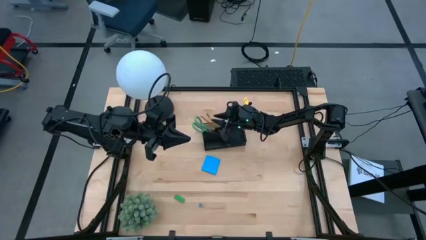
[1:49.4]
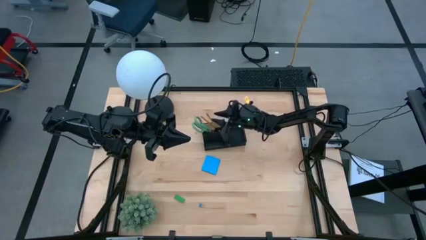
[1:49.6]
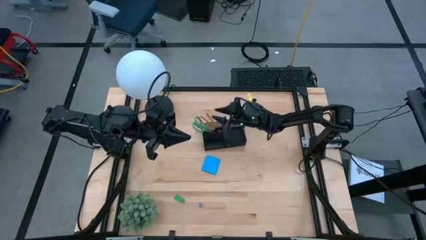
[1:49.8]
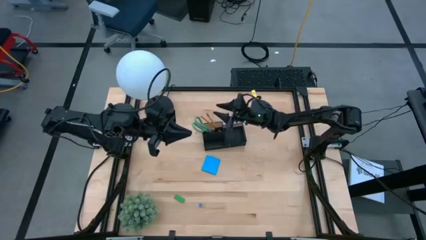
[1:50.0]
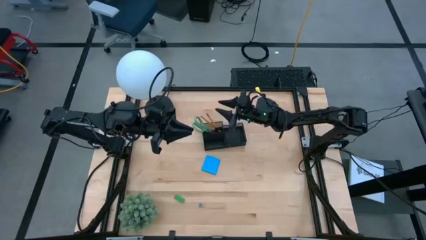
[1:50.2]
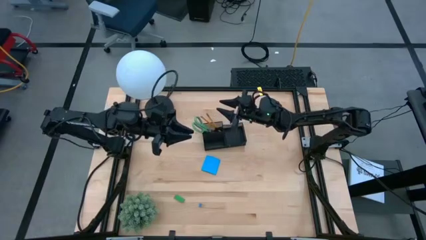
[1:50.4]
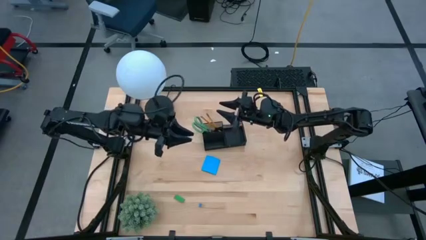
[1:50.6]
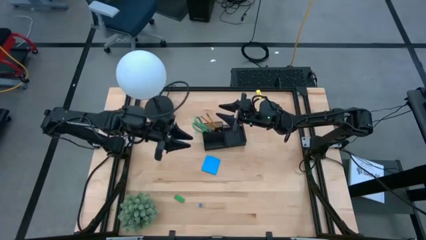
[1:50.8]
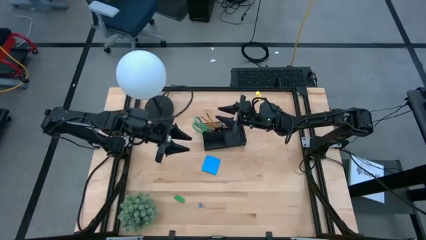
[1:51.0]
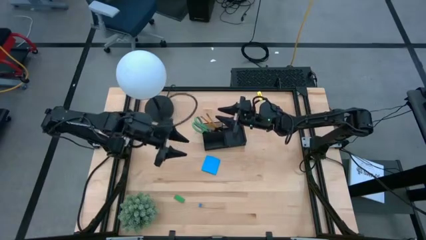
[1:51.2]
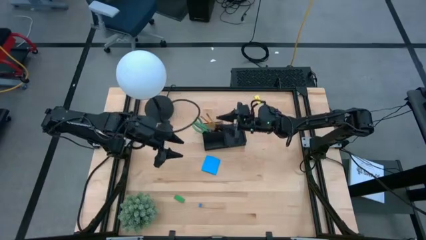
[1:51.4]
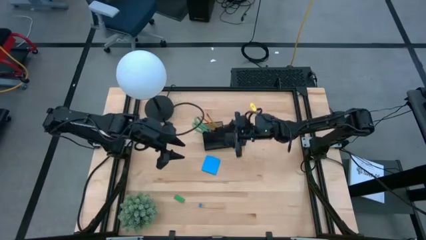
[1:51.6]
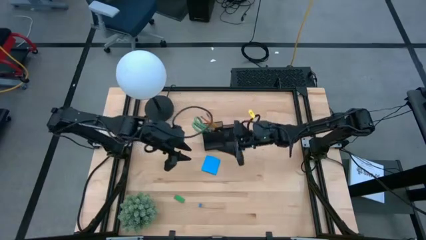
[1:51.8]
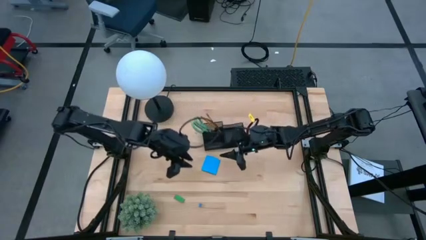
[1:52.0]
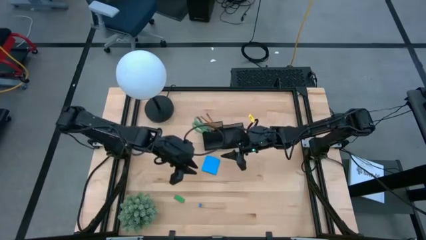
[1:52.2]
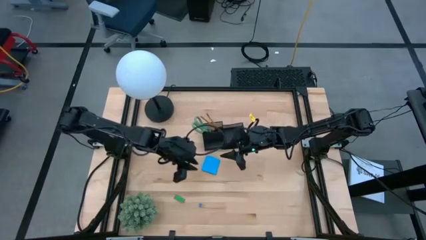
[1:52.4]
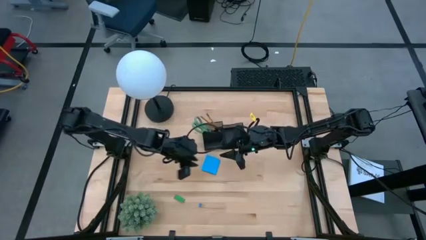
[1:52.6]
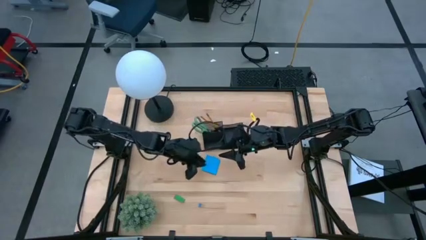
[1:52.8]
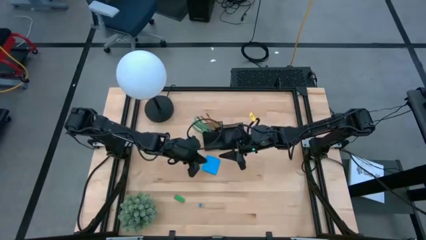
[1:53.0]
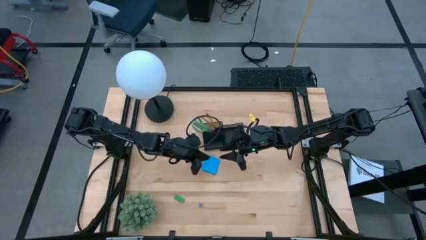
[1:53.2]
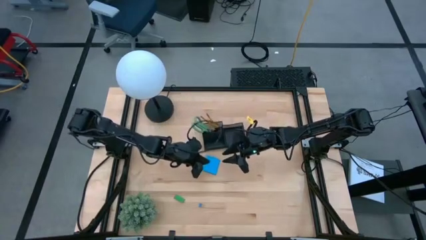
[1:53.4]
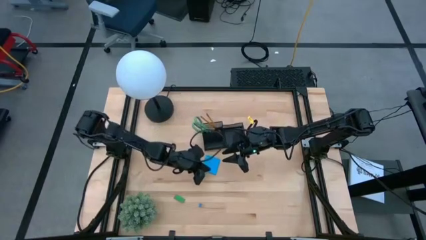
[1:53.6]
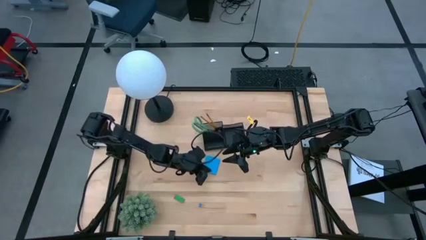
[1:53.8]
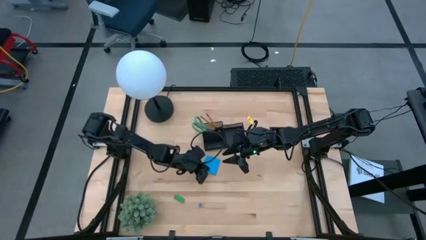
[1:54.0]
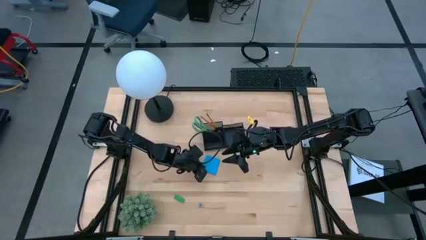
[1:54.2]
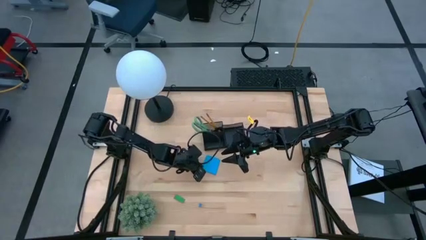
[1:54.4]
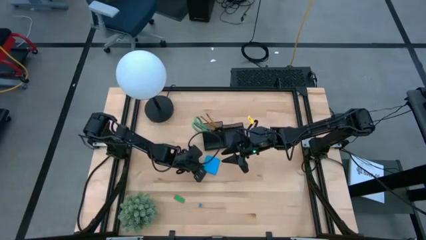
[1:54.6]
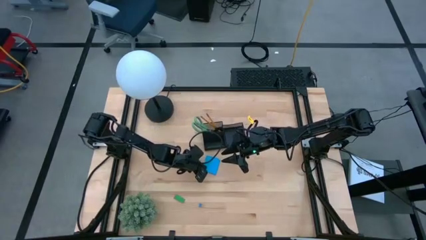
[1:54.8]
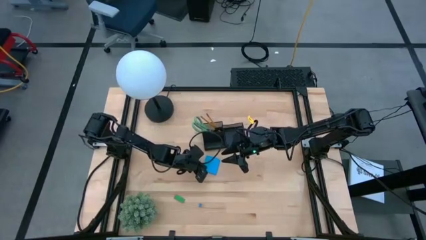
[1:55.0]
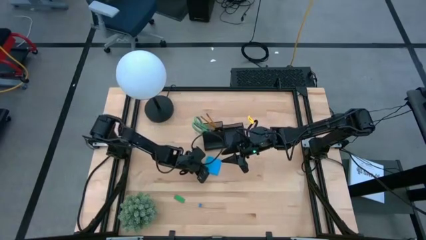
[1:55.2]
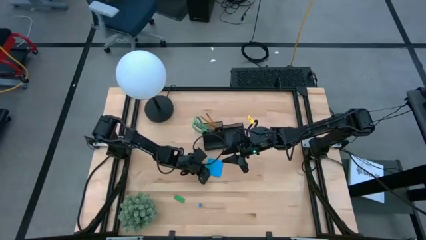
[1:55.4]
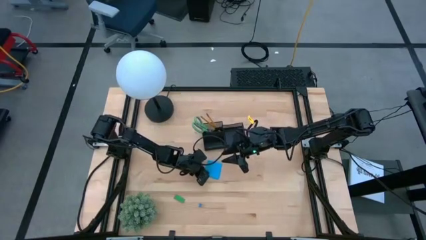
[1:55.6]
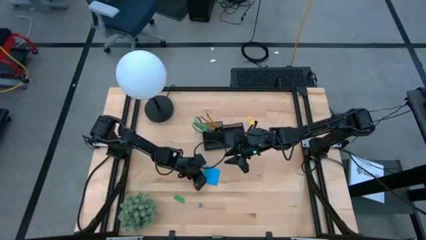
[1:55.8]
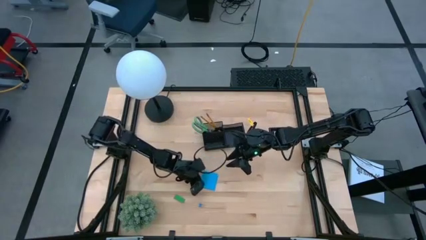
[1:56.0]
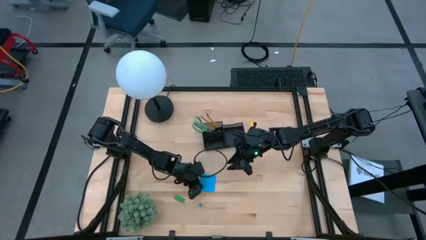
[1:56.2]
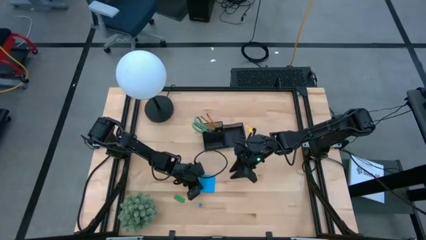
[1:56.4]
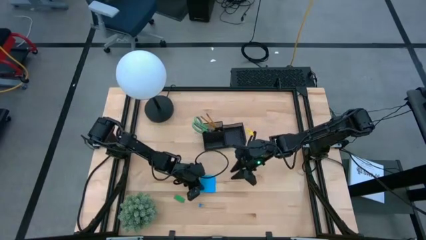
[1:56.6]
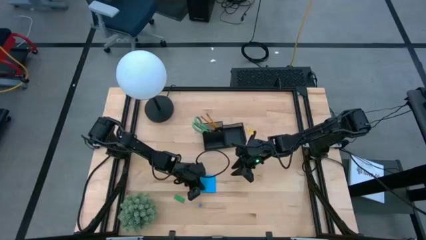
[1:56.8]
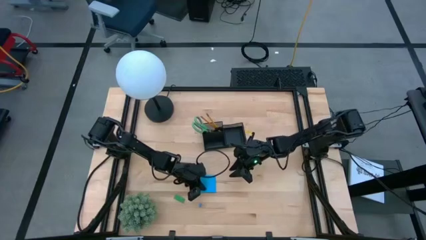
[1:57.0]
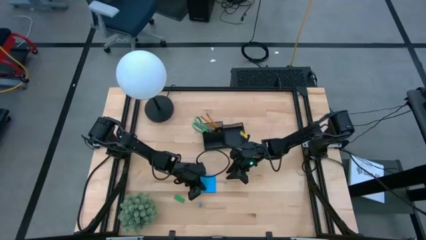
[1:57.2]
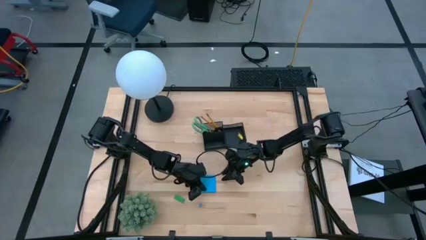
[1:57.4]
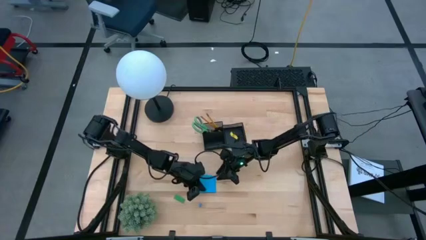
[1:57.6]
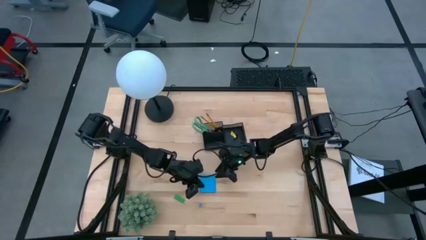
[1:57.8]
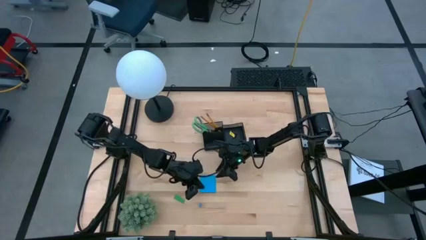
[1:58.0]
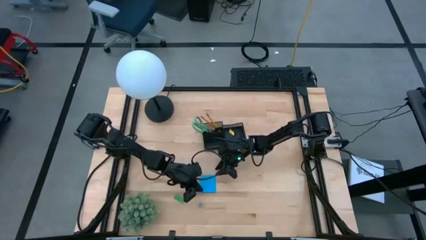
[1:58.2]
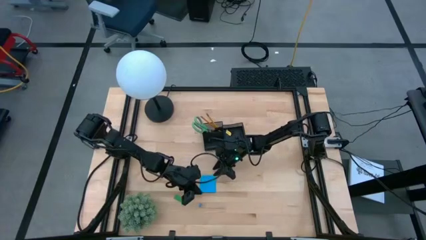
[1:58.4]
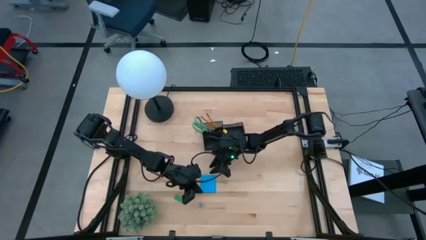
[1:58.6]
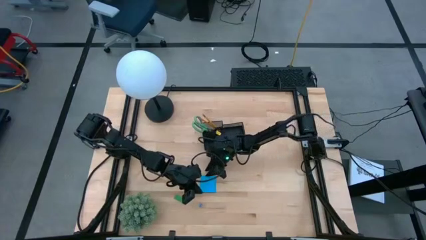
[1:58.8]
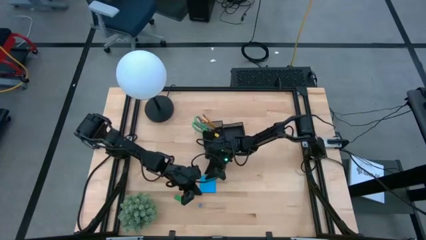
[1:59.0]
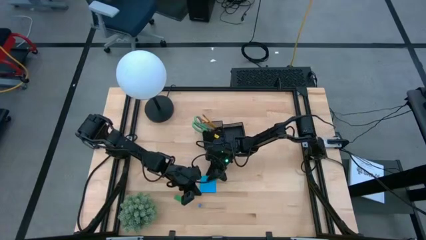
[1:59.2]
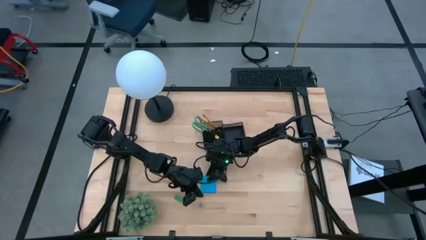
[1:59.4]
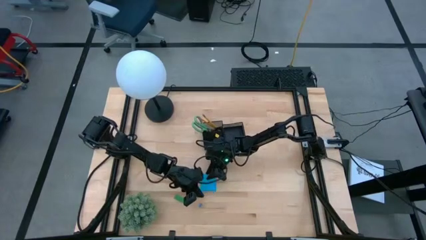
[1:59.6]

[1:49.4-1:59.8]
Task: Pick and place office supplies into organizer
Put the blue sticky notes into the black desk organizer

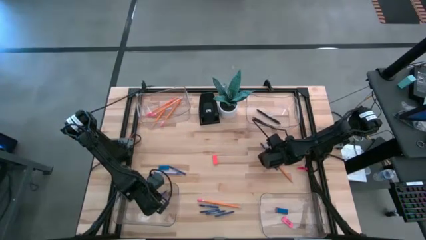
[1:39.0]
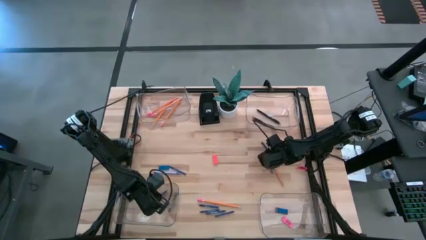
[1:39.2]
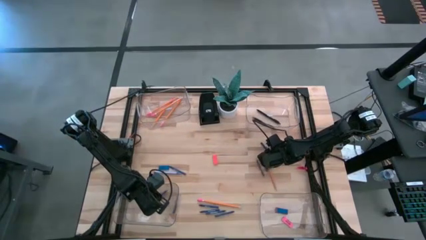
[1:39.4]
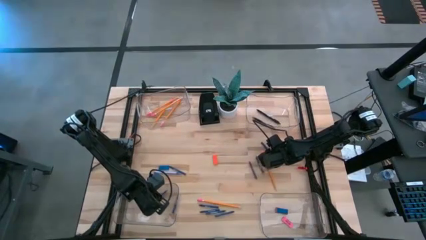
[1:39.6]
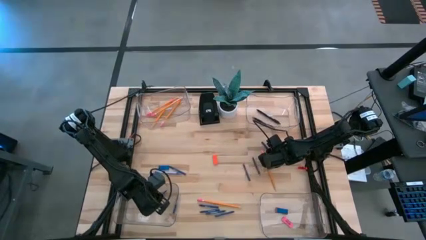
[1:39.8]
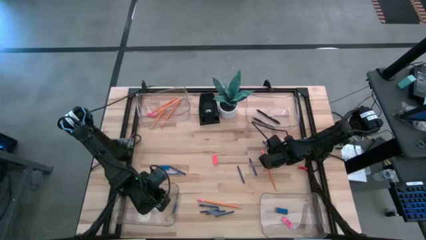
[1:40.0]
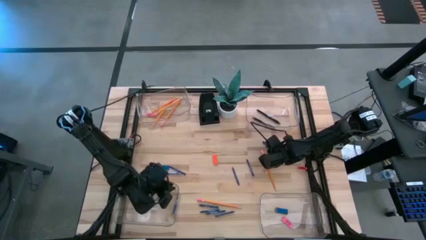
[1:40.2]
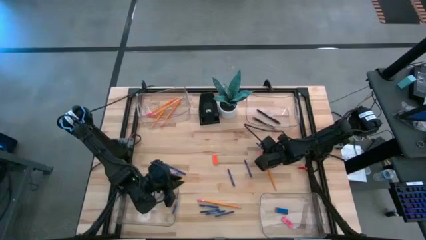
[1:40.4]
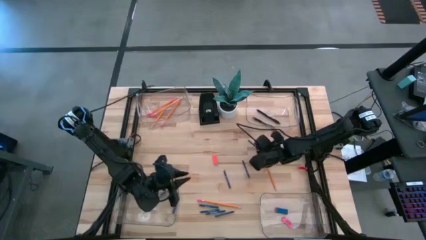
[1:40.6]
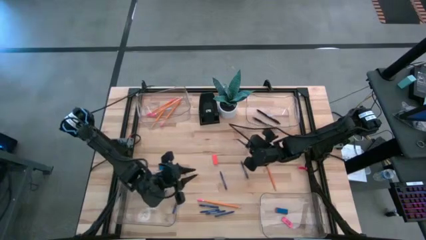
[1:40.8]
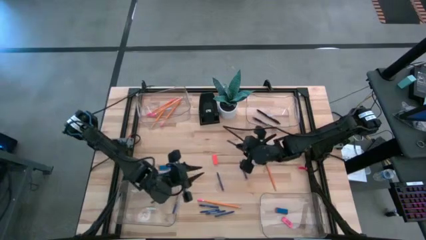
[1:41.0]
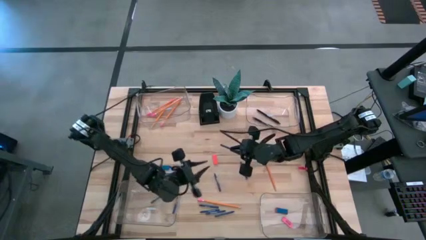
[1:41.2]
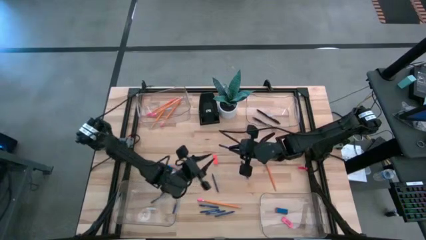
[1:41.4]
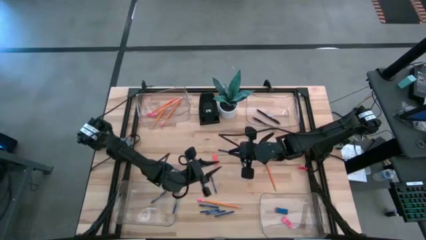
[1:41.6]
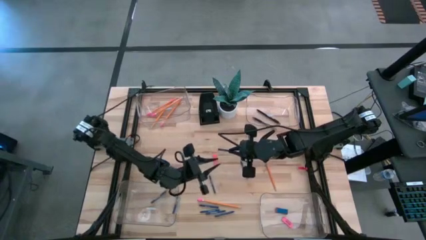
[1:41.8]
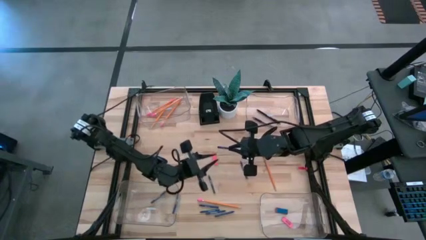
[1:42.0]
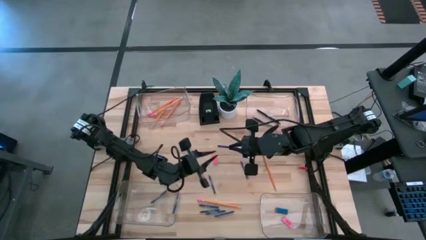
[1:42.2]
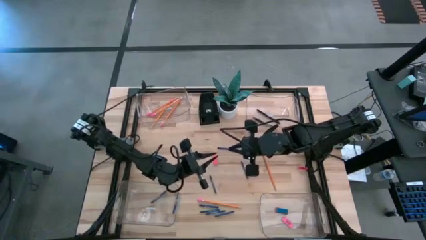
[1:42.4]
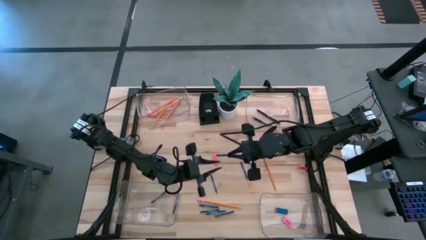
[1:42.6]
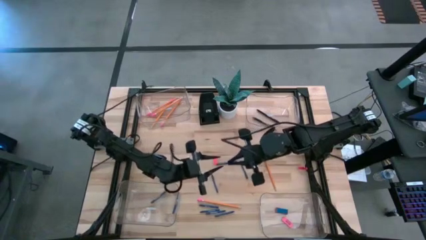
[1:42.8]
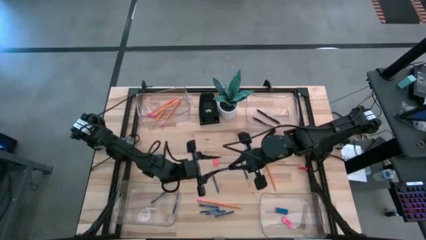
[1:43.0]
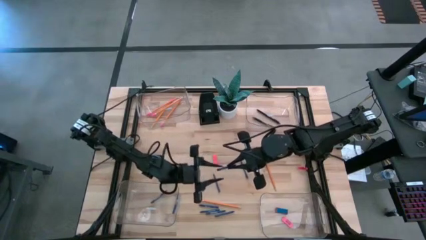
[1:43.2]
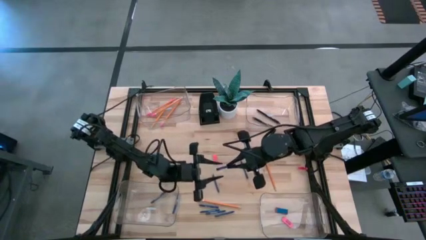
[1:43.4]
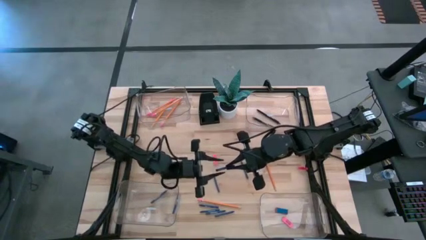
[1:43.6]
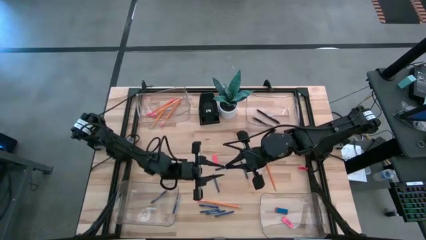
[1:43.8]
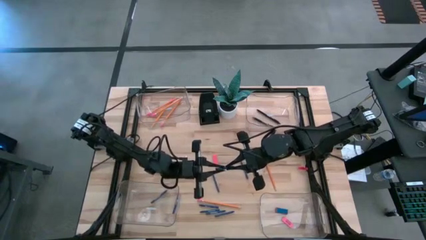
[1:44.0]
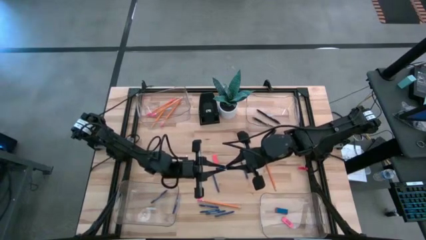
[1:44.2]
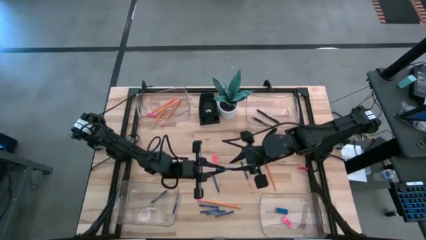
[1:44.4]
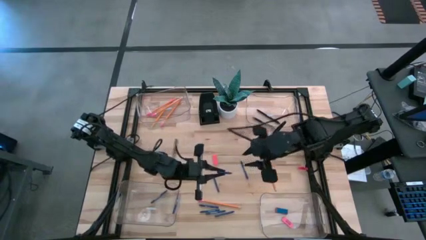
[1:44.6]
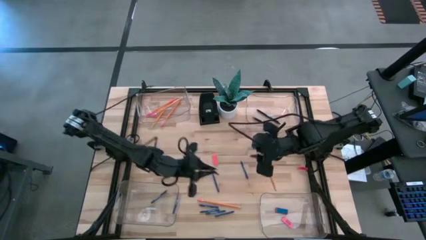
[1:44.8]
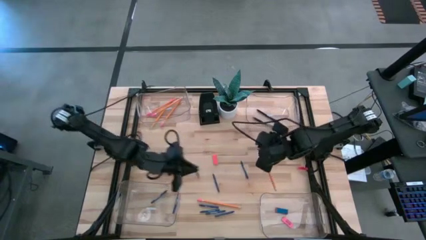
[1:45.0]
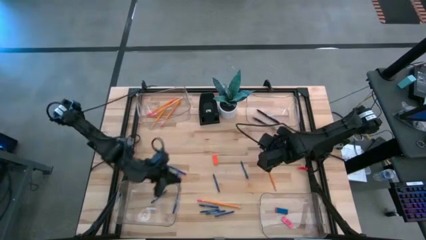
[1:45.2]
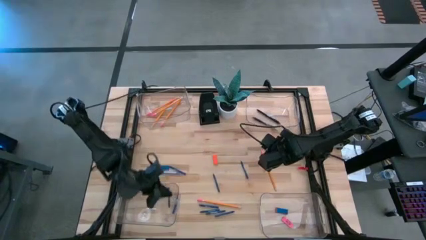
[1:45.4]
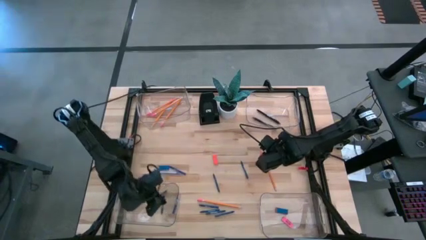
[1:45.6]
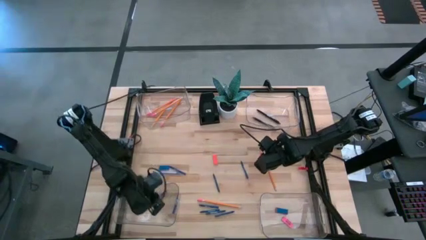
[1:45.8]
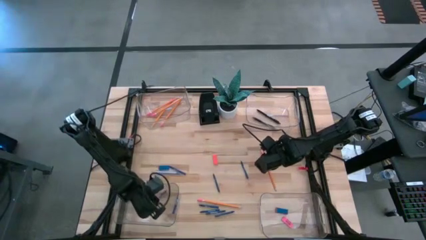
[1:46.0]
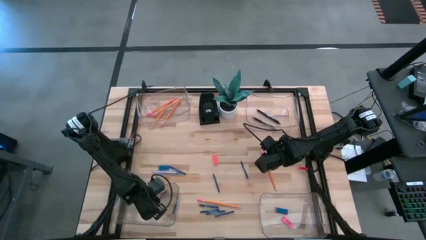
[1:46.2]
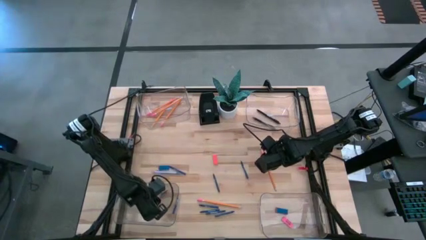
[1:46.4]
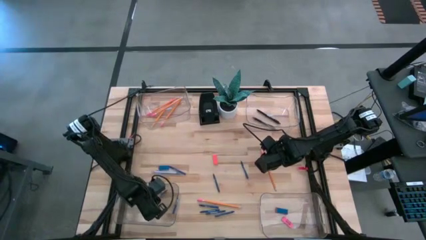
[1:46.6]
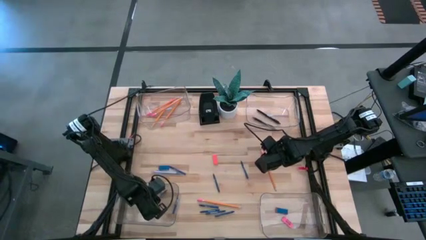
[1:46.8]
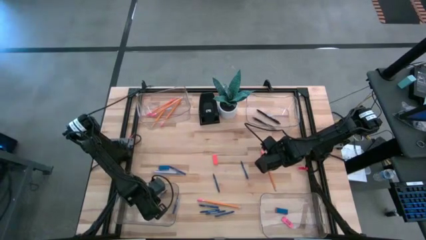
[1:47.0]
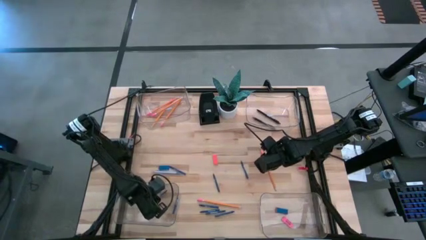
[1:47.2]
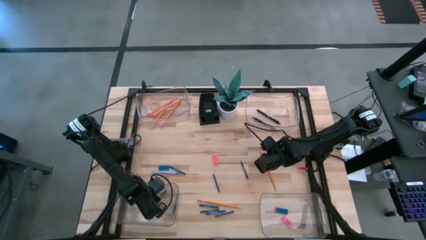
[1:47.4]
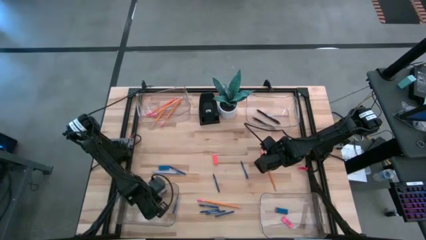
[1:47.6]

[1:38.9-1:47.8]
Task: Sort crayons/erasers/pens/pencils in bins
Put the blue crayon into the bottom left transparent bin
